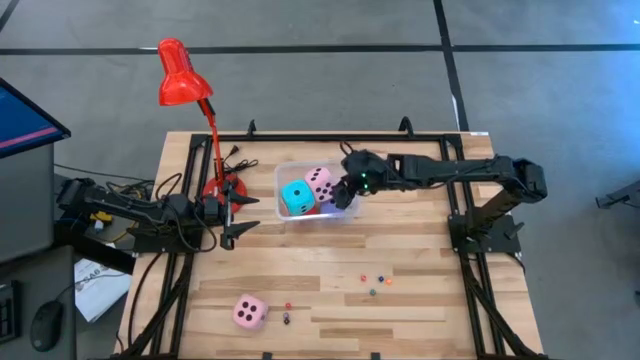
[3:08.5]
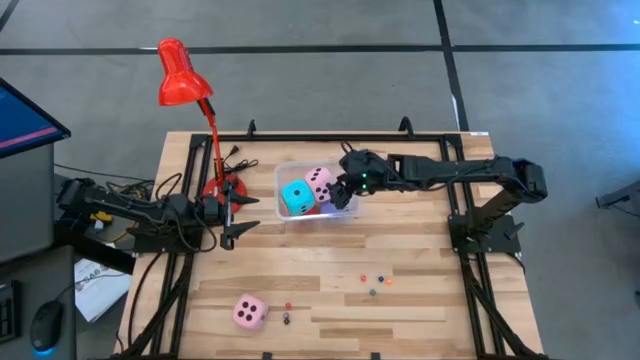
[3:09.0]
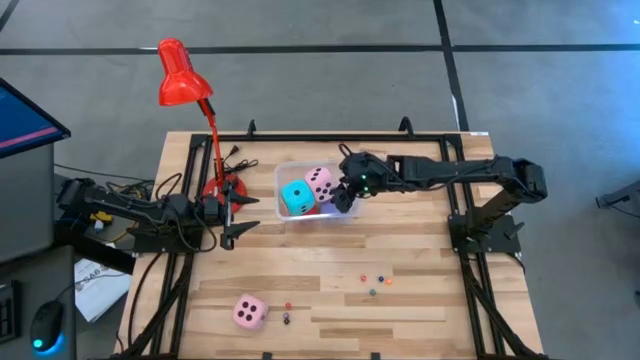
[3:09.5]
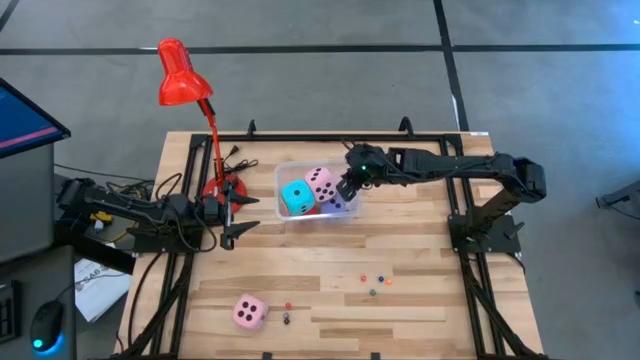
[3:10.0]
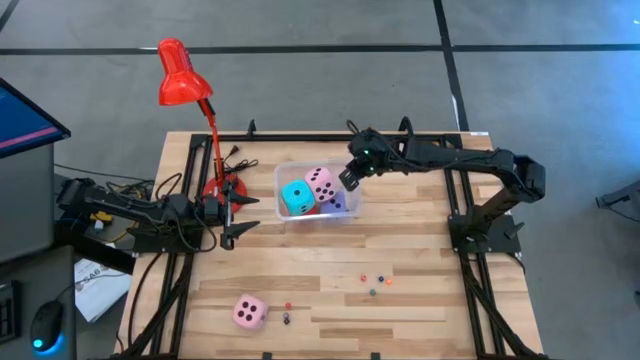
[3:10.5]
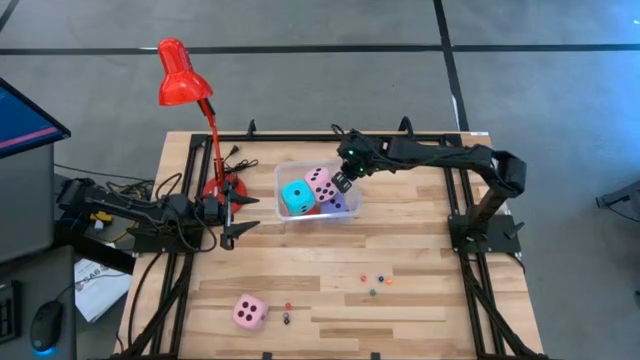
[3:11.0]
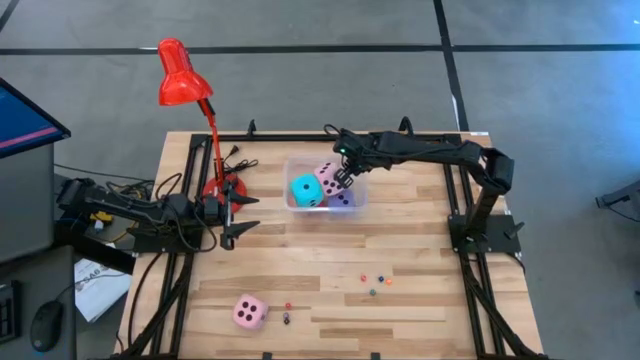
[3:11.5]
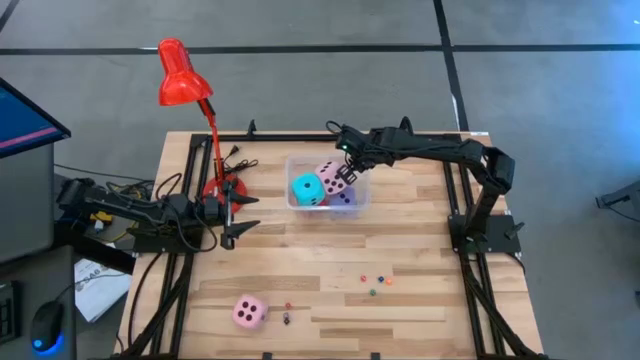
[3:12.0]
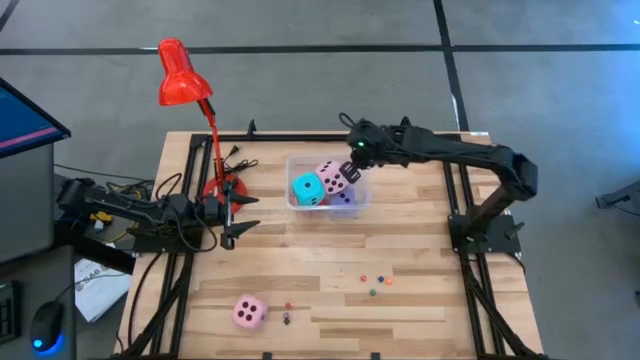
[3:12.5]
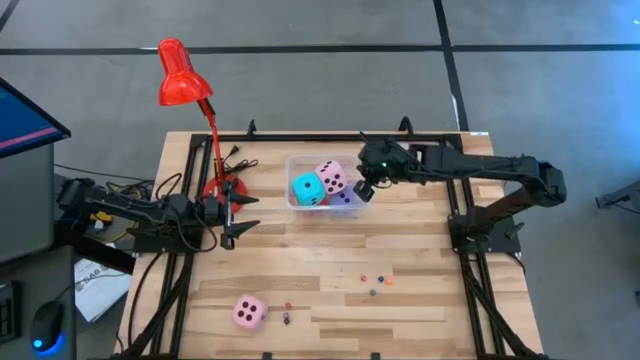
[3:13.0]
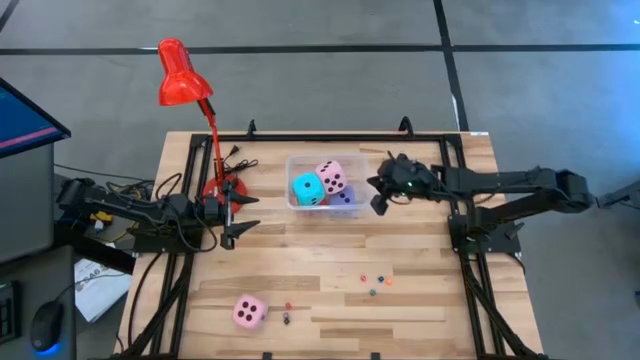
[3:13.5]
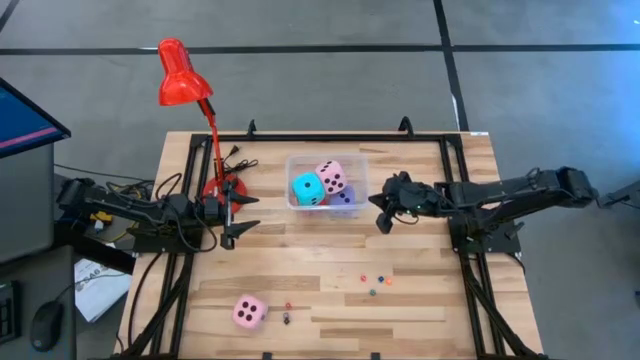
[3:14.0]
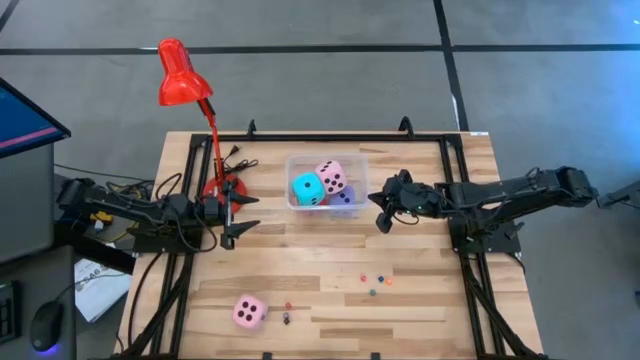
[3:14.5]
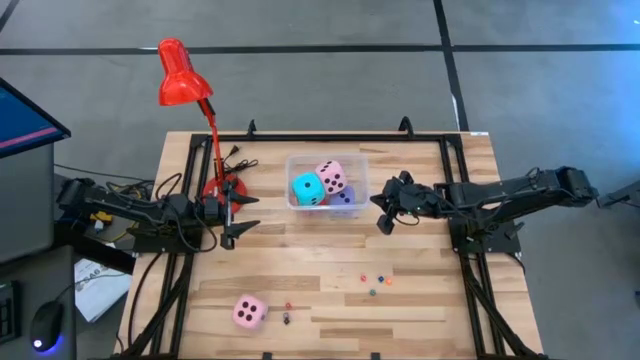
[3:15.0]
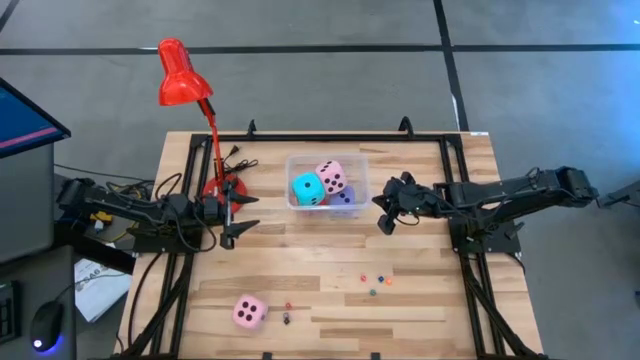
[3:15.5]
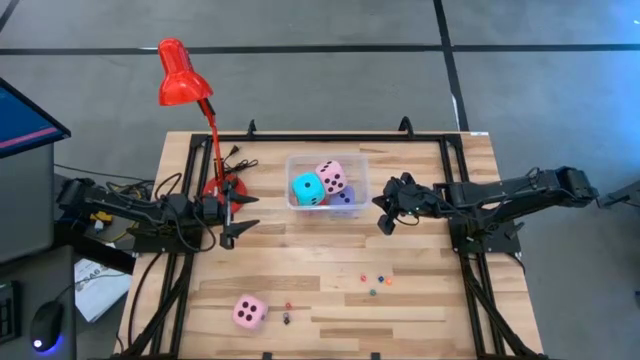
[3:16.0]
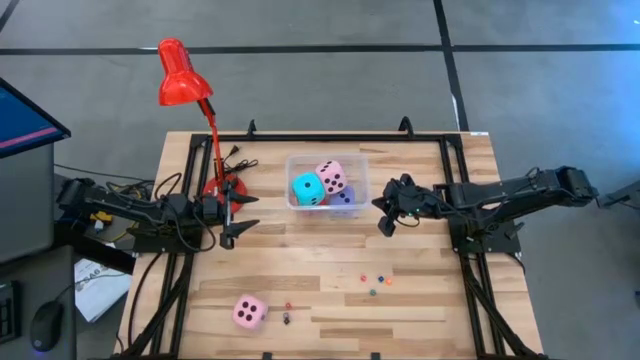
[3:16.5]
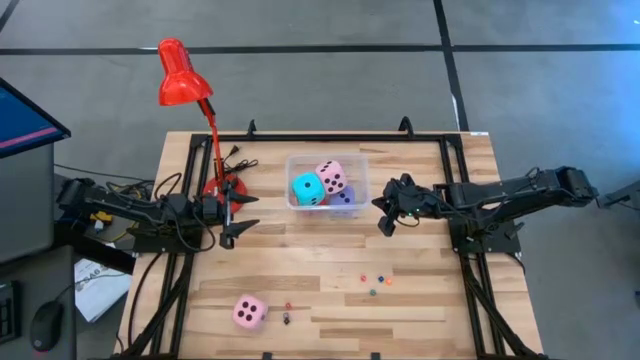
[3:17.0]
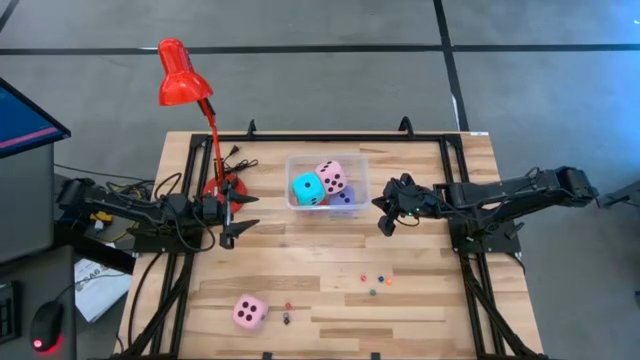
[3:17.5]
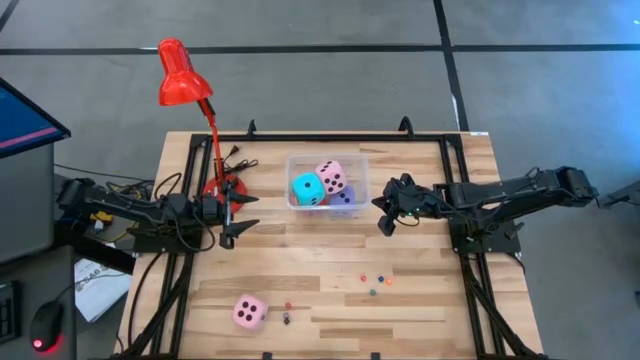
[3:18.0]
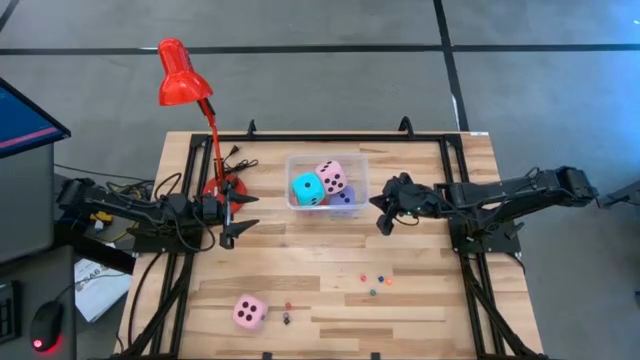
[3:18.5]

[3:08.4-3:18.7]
Task: Pick & Place Dice
Adjust the transparent bin

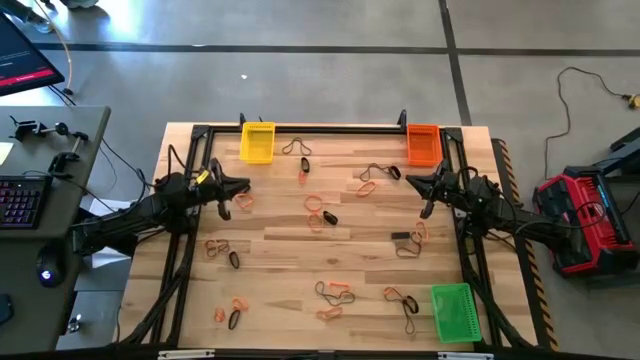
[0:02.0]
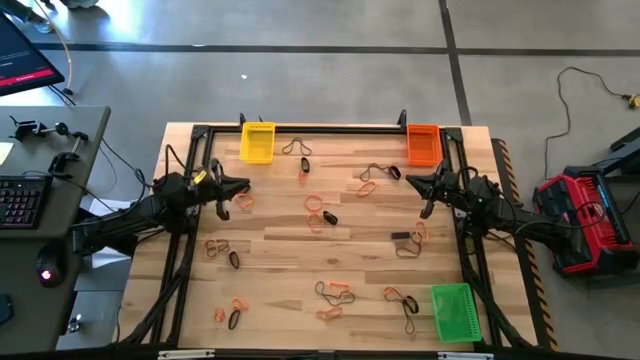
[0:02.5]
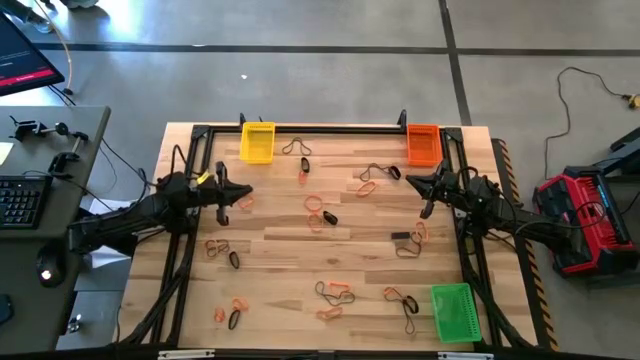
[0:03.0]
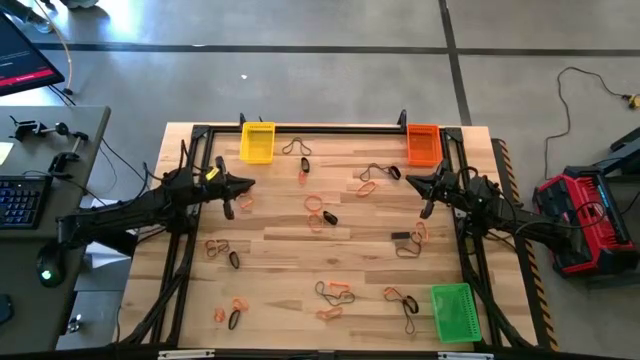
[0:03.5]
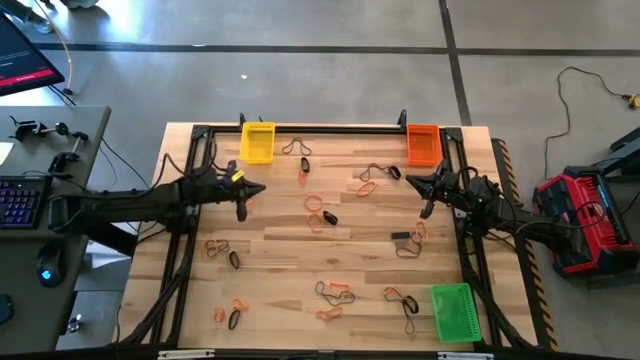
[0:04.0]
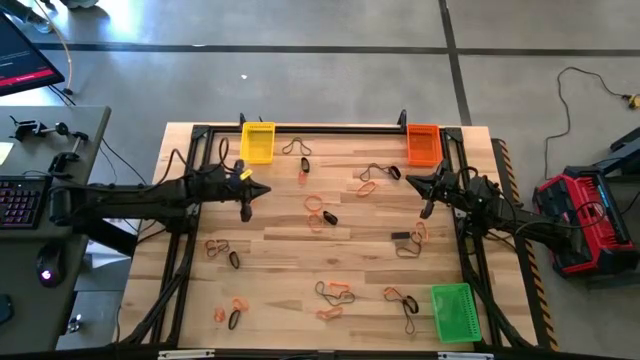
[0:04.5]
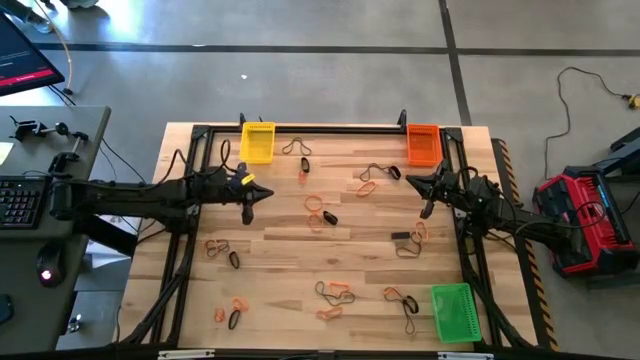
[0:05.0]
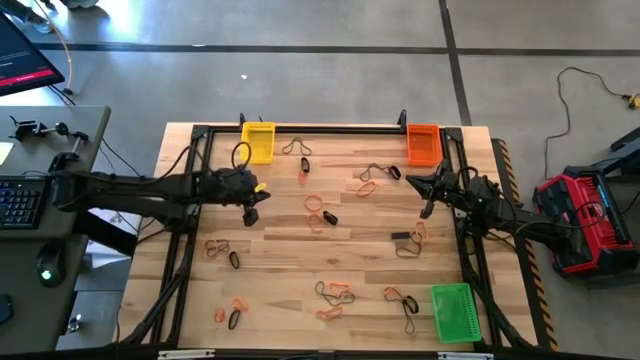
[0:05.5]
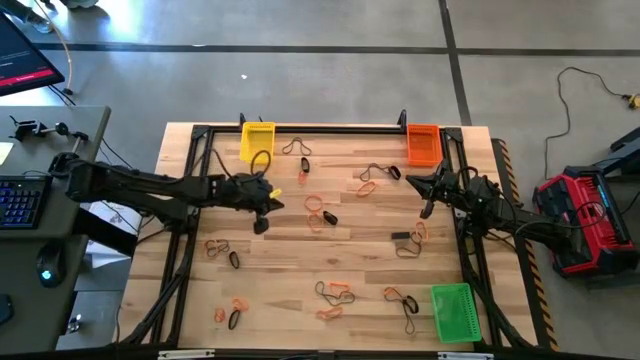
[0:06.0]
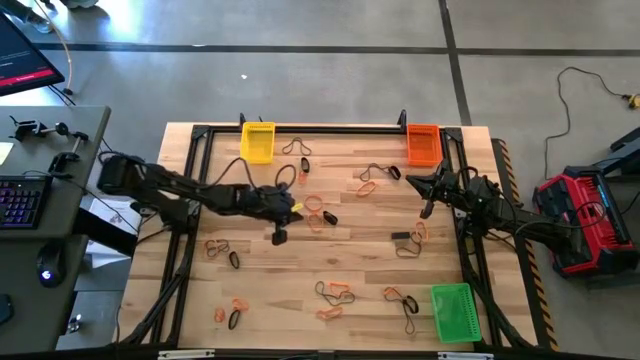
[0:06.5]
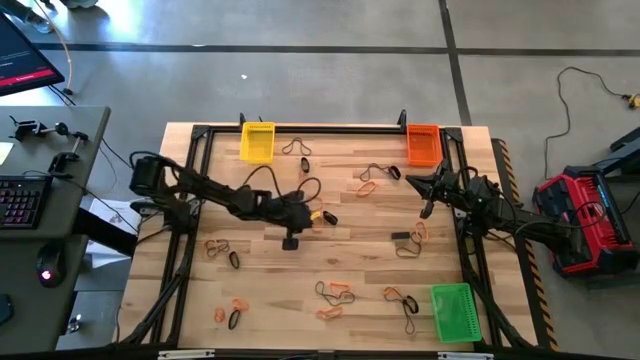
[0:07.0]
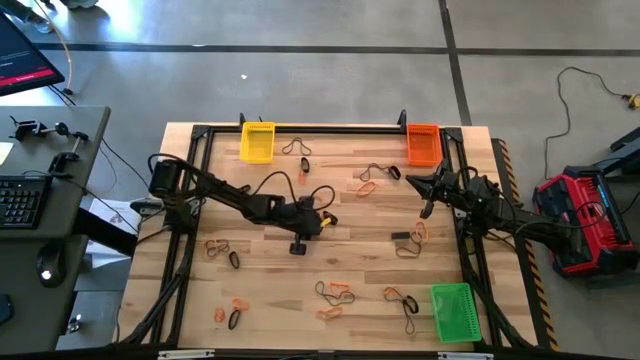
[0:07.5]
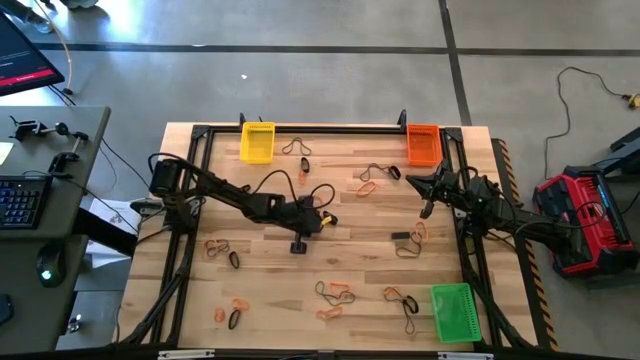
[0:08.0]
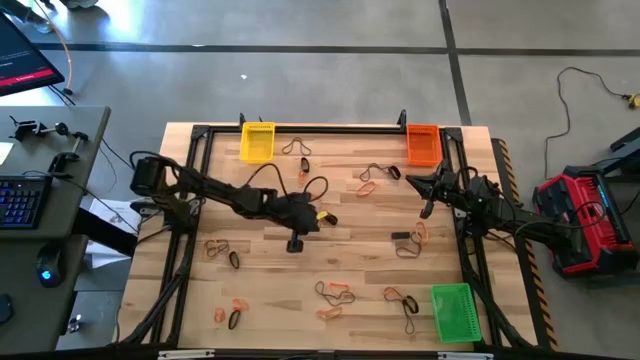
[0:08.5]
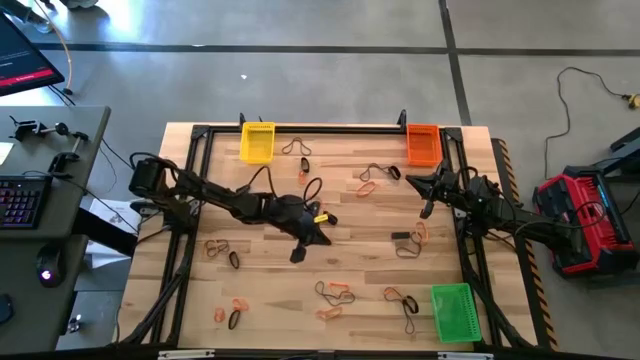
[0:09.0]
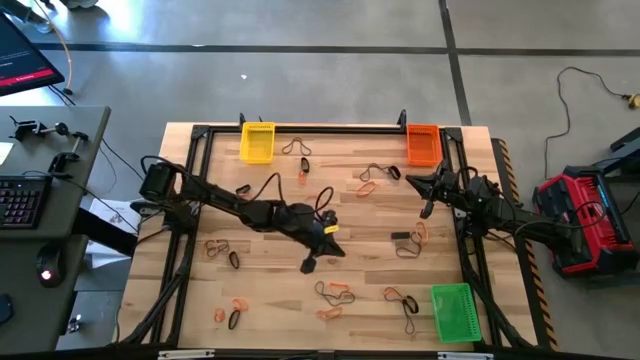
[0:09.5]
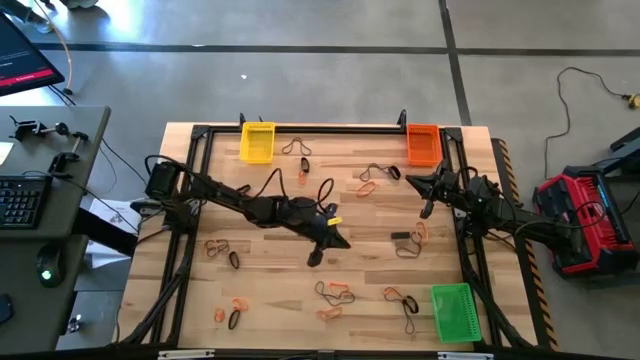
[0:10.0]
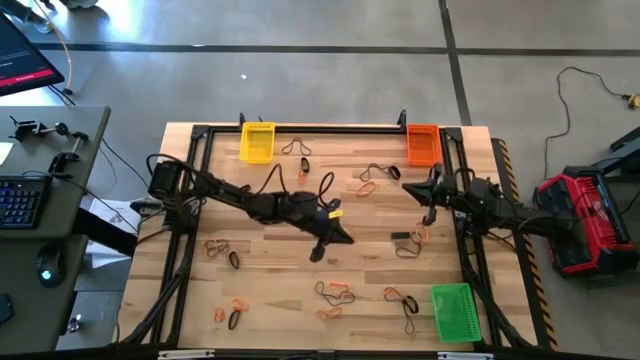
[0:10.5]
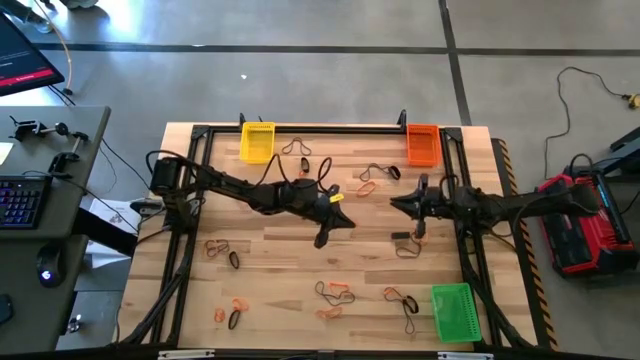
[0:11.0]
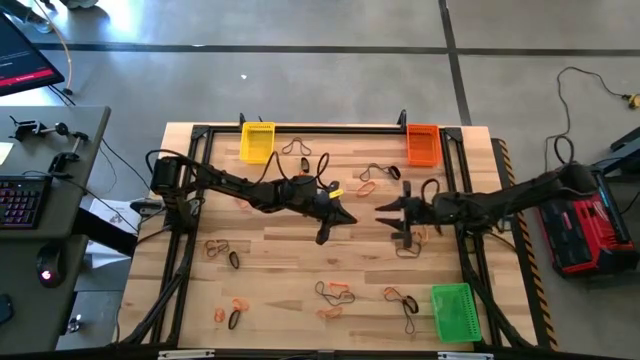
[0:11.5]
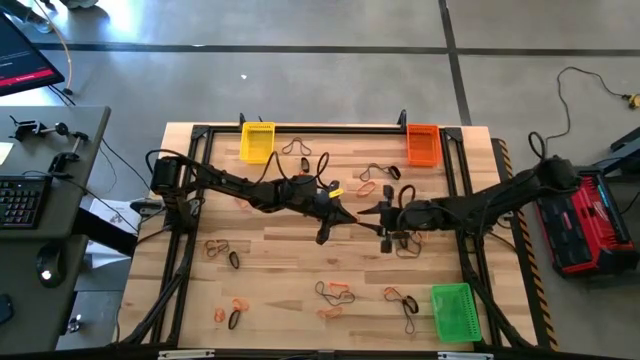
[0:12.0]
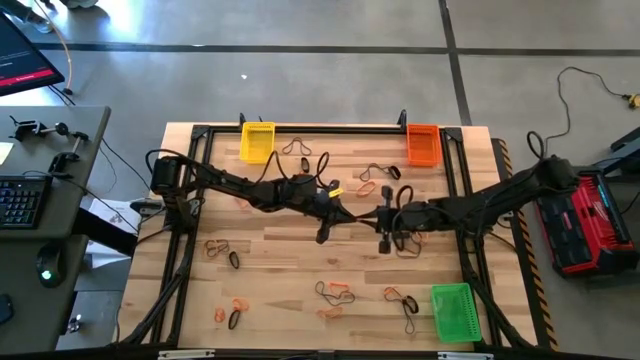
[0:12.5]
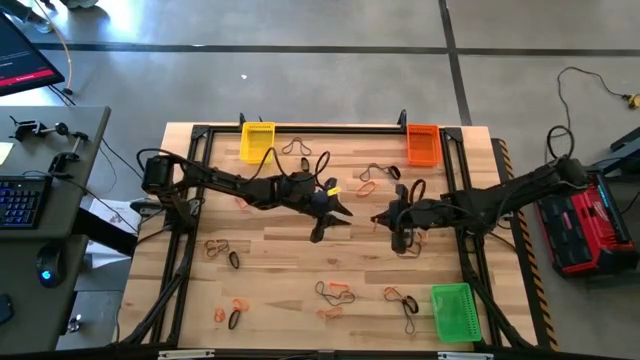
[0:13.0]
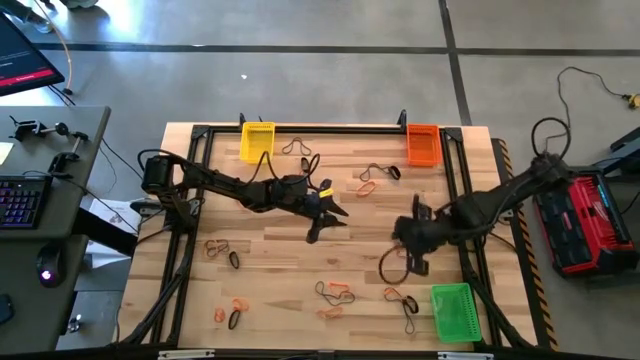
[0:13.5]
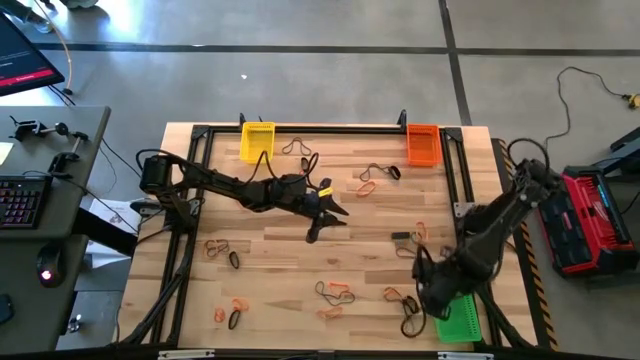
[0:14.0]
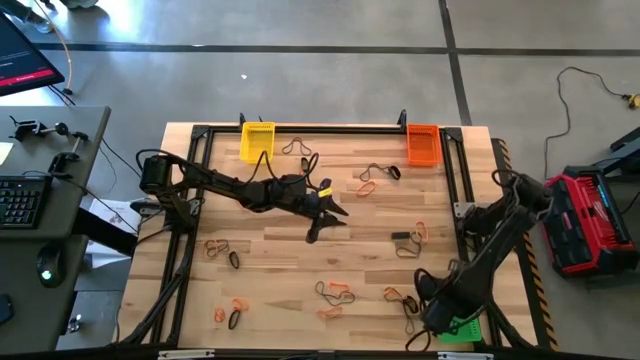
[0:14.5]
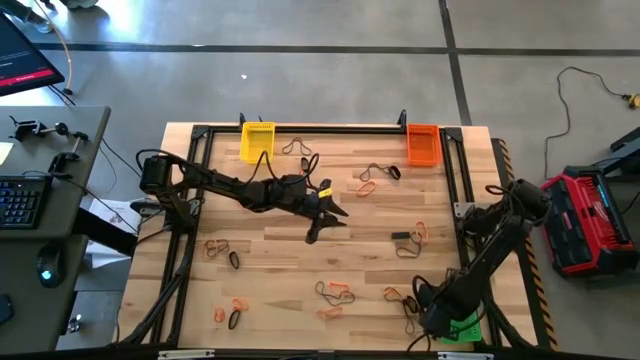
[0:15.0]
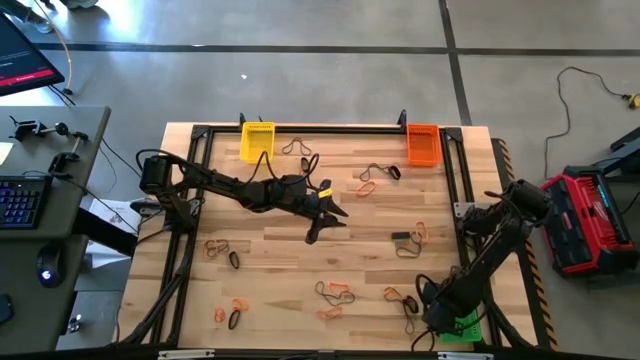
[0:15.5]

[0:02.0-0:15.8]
Task: Sort rubber bands into baskets
Put the orange rubber band into the green bin
